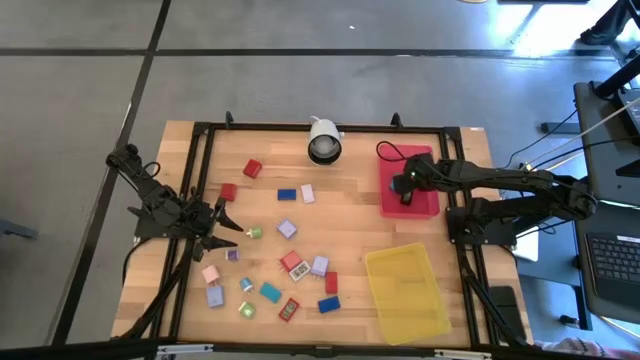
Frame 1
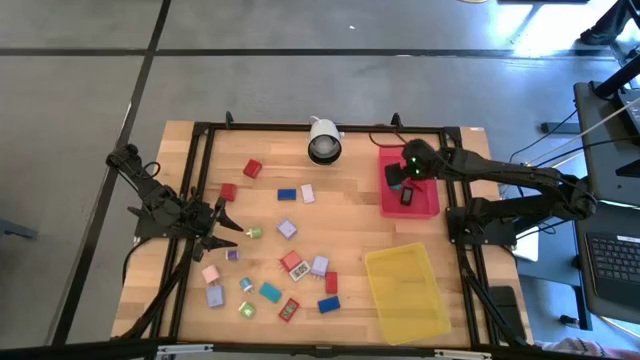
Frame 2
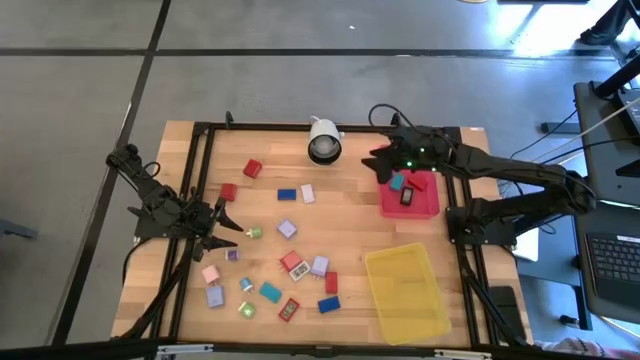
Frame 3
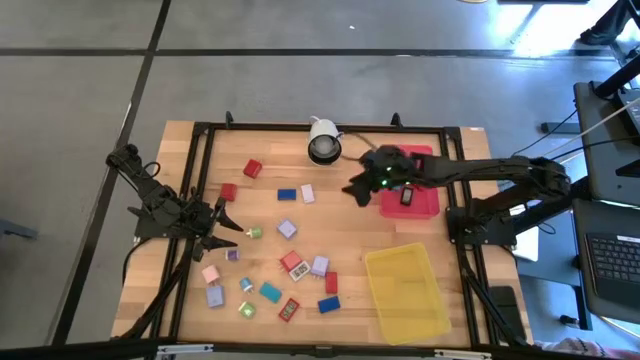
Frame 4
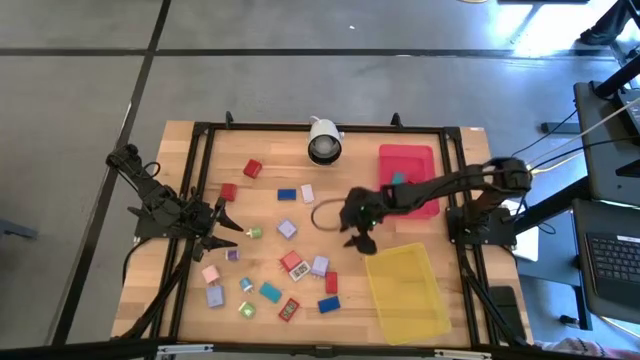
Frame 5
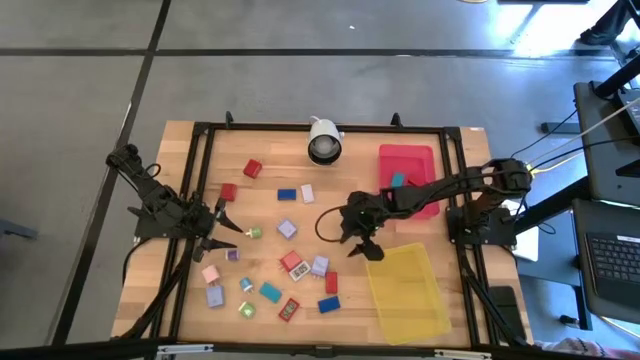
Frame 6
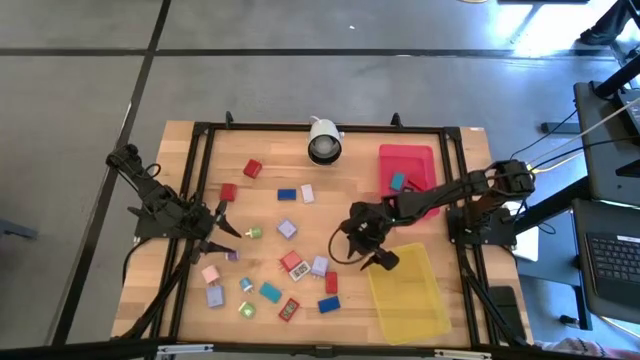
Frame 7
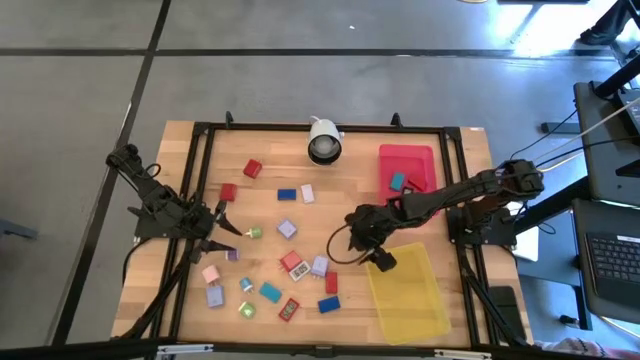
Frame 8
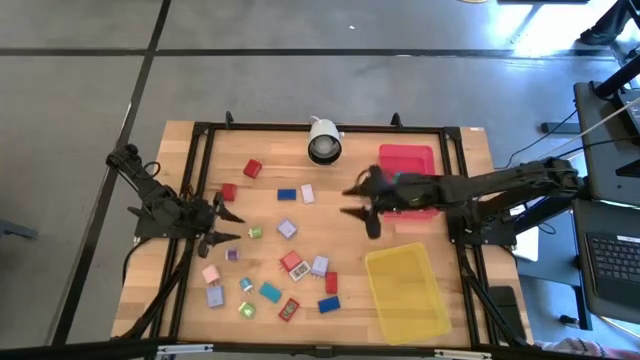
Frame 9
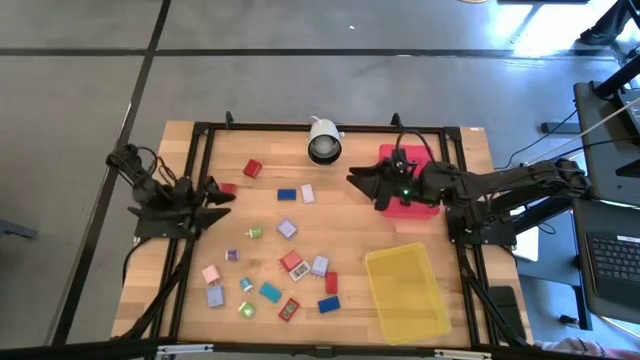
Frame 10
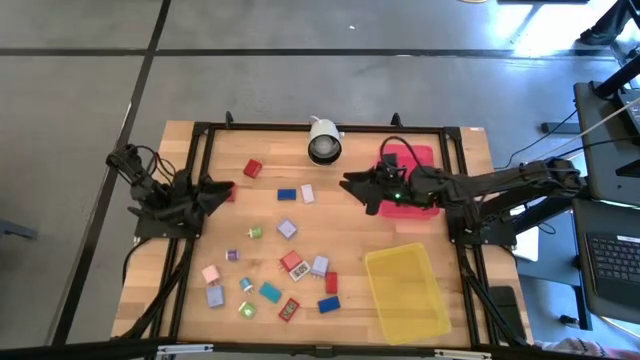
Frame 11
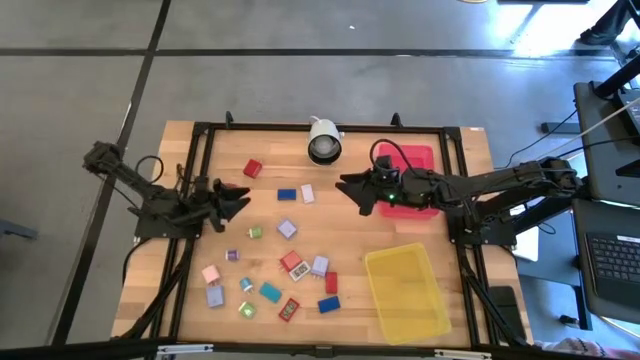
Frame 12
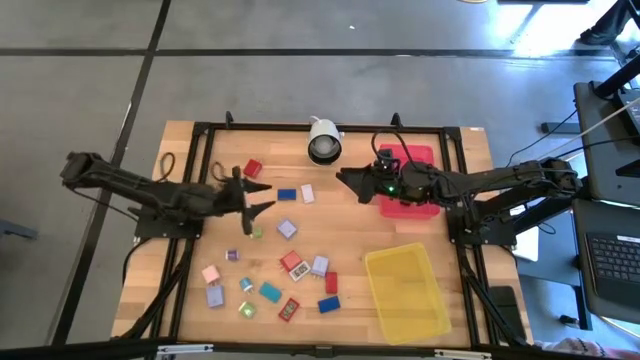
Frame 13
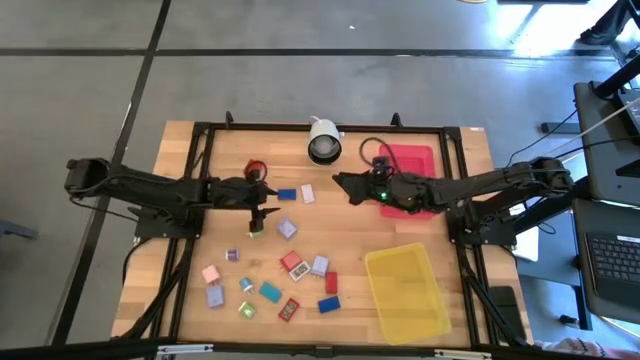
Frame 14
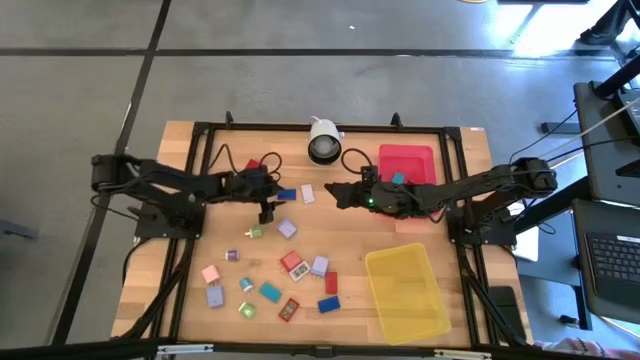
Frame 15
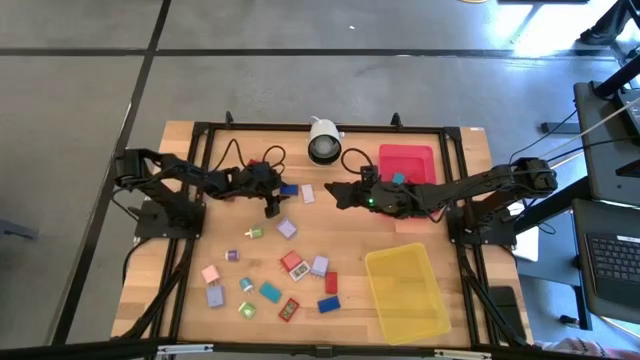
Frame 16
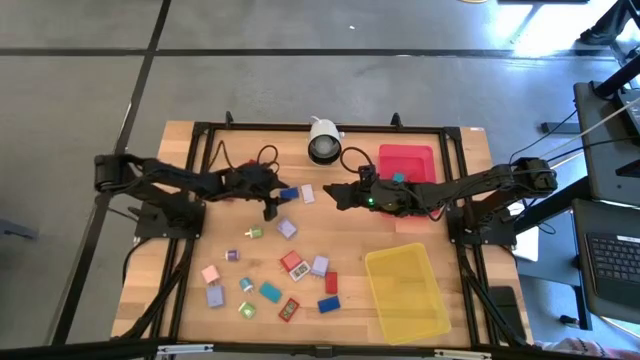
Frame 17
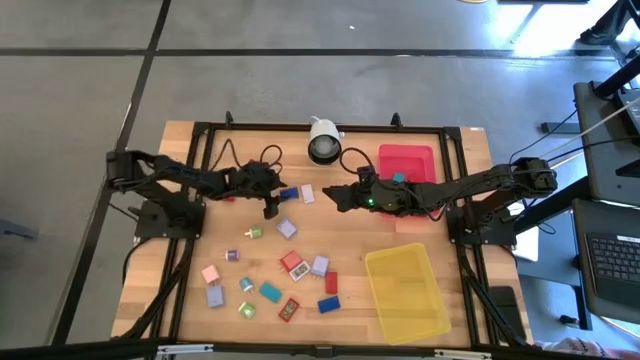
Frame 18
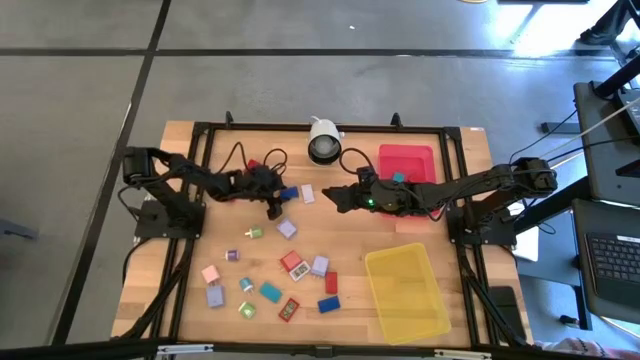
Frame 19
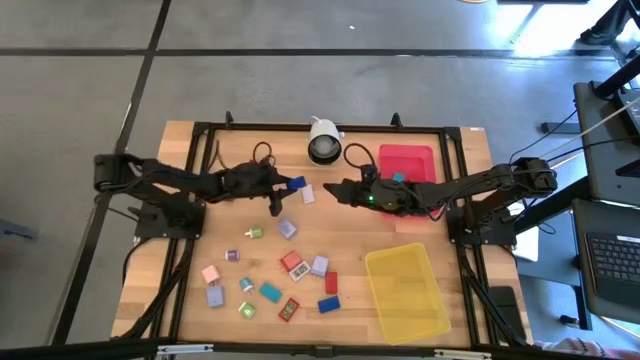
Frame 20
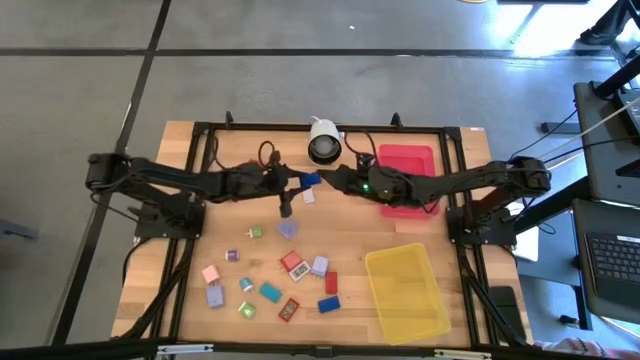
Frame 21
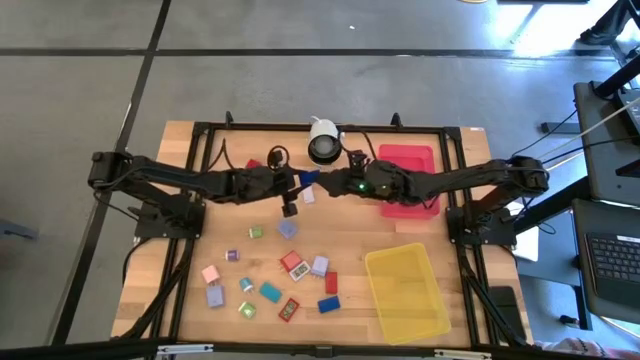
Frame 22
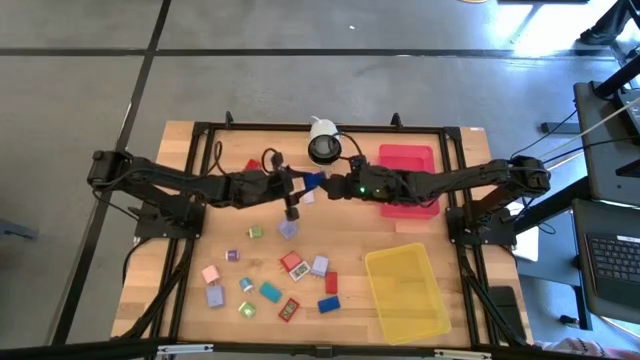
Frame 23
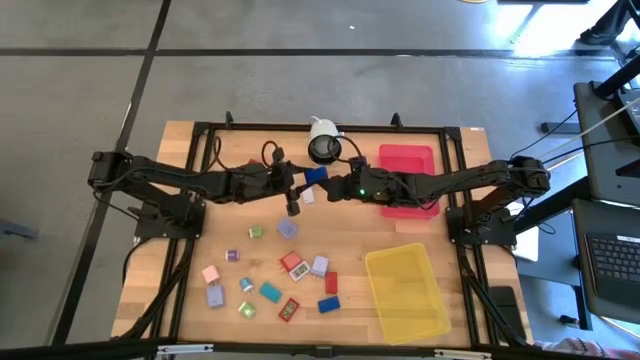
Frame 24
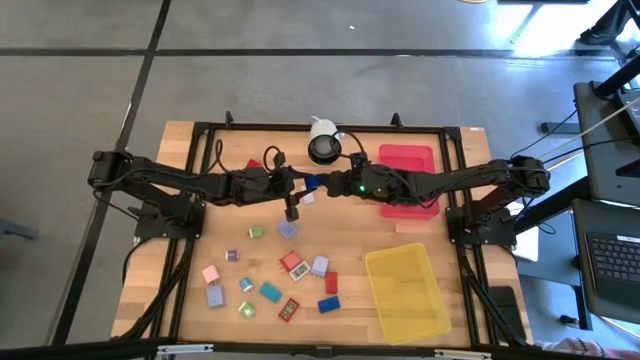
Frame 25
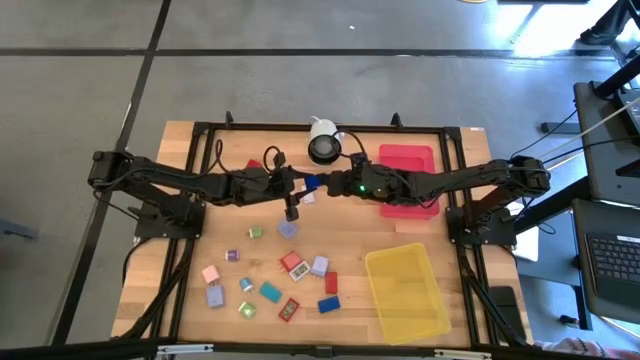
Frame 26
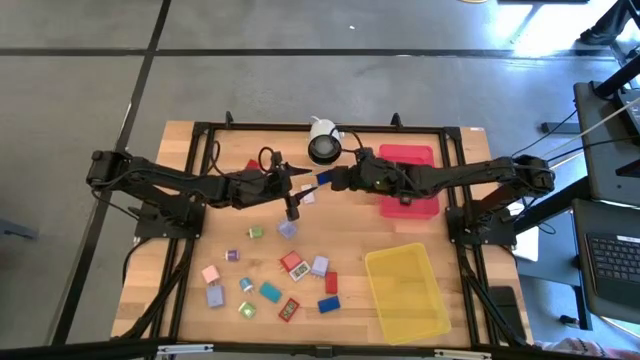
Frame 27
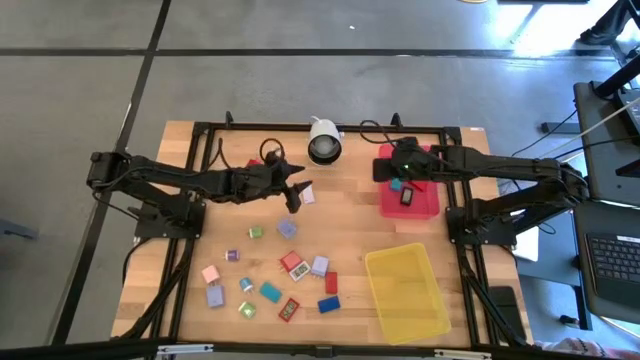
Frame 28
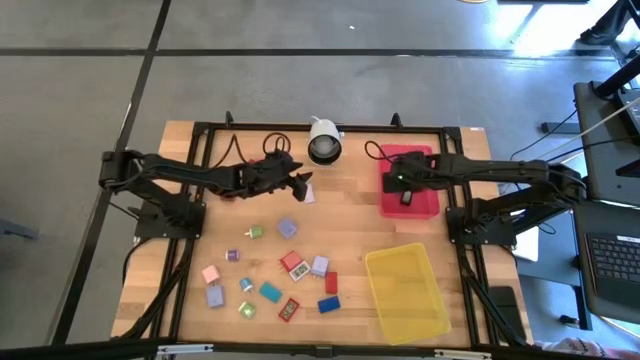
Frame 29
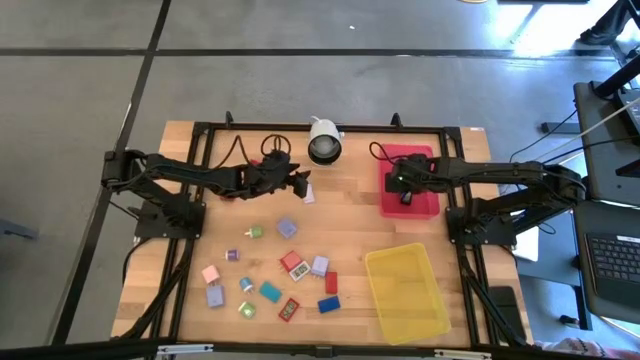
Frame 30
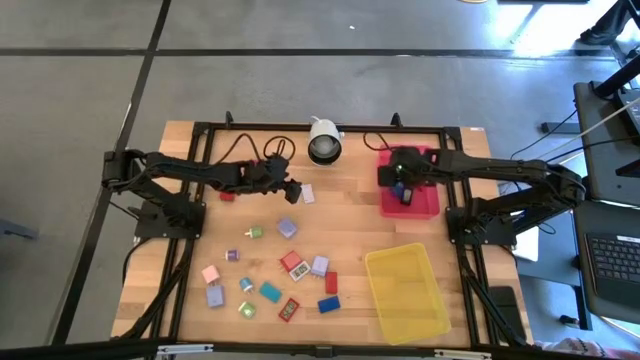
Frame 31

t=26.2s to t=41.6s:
Task: Pick & Place Office items
Put the top blue digital timer into the pink bin

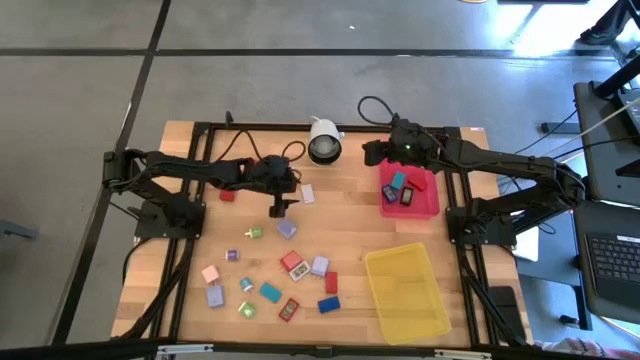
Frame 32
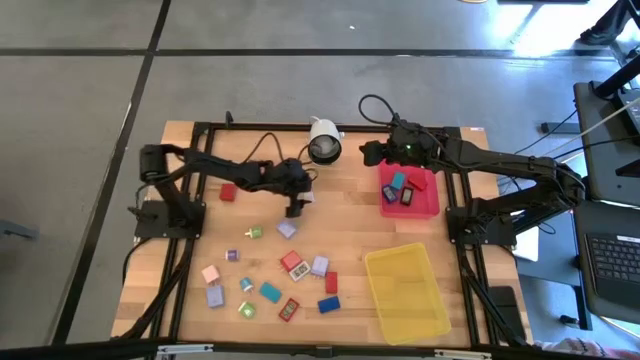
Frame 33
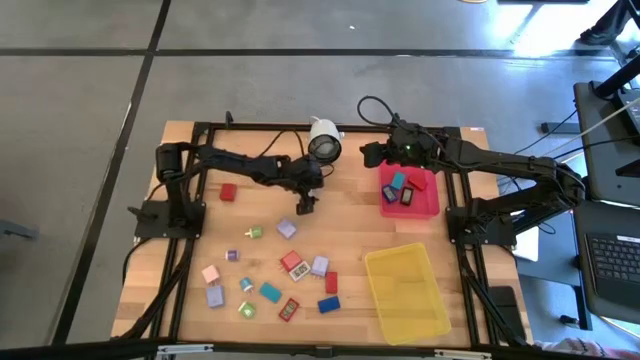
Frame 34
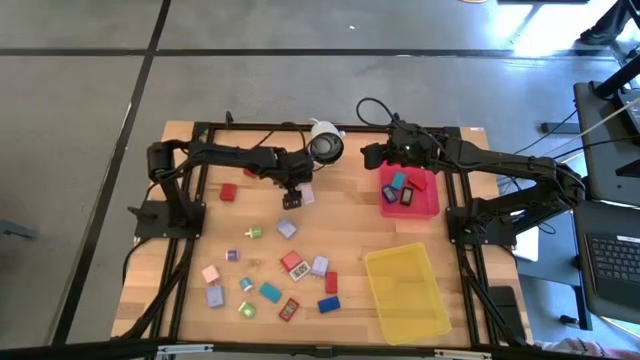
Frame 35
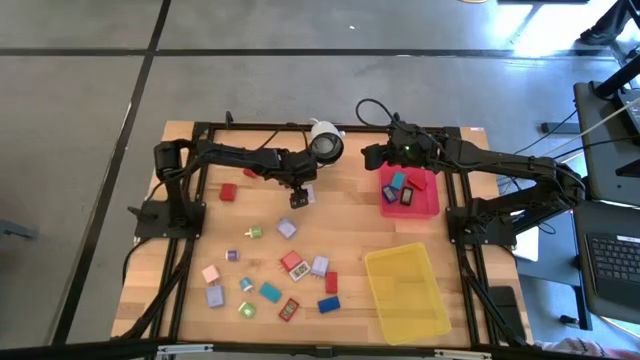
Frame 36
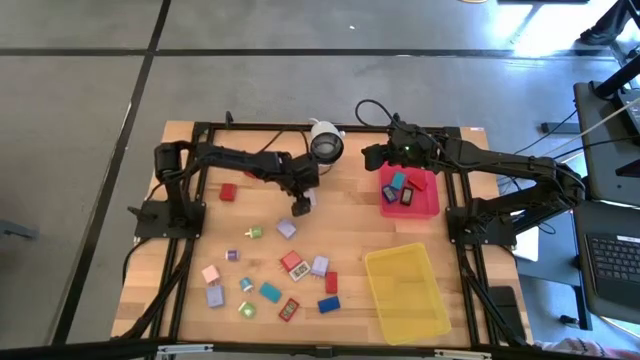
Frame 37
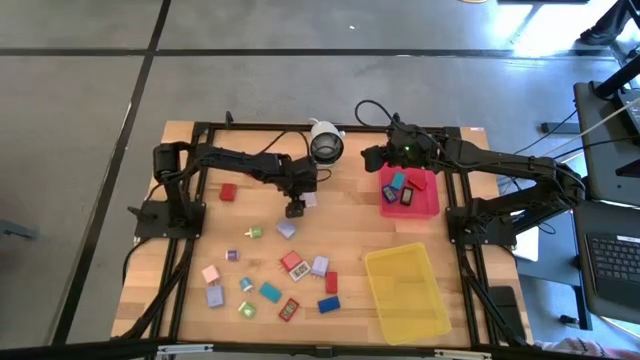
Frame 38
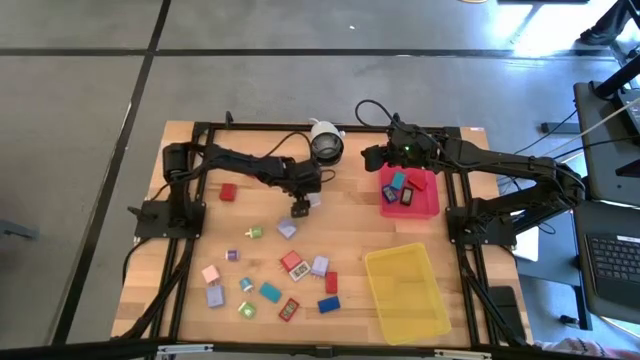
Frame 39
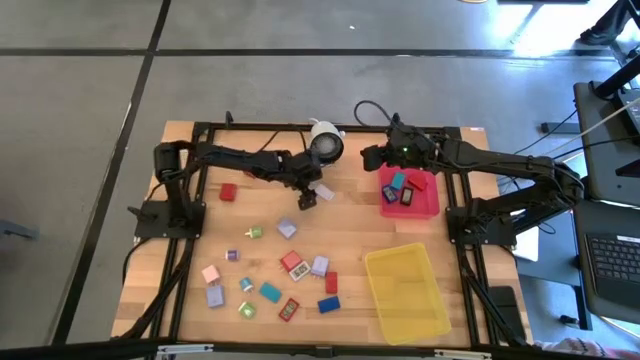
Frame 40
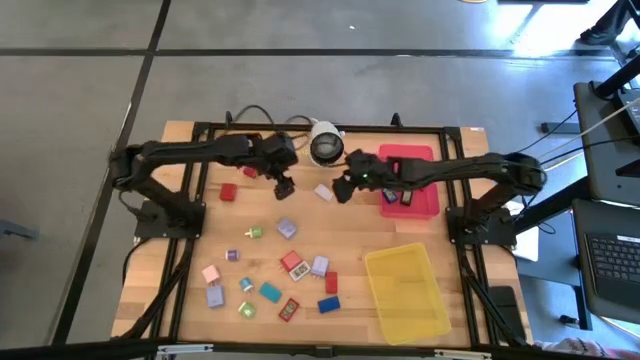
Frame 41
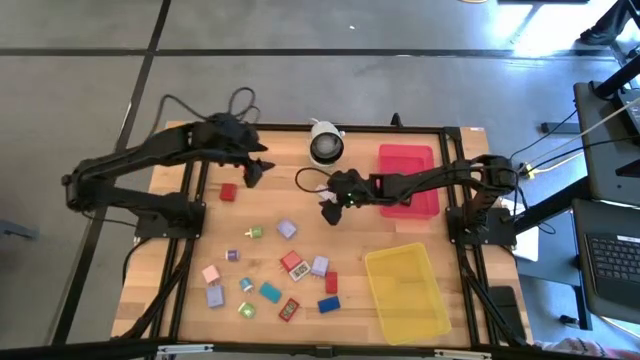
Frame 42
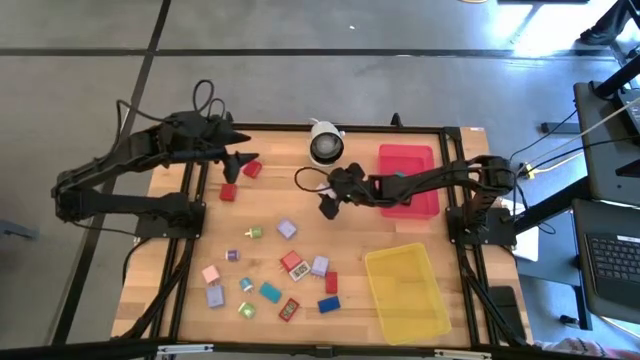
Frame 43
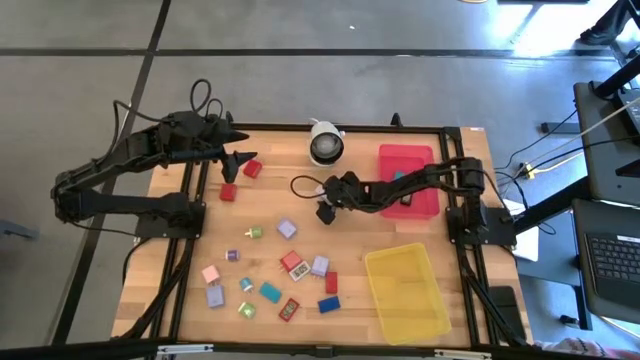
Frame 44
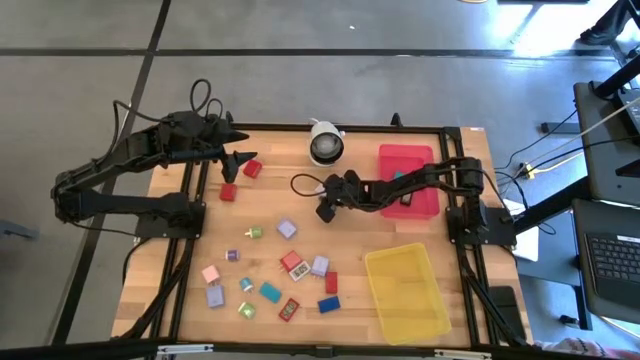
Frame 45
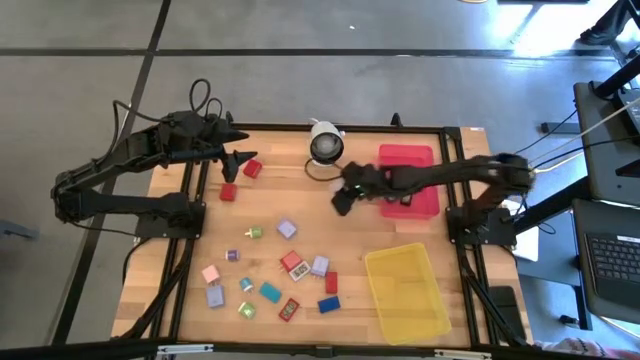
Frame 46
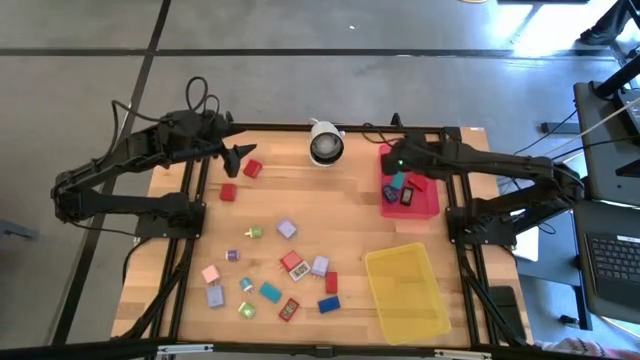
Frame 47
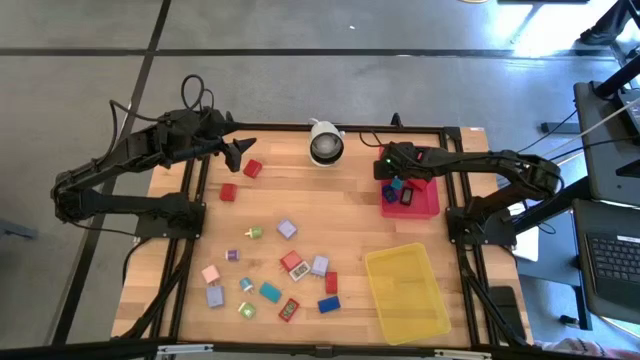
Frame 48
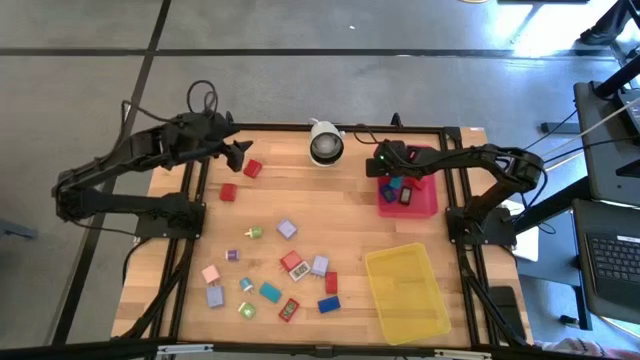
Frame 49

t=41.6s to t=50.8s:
Put the white digital timer into the pink bin
